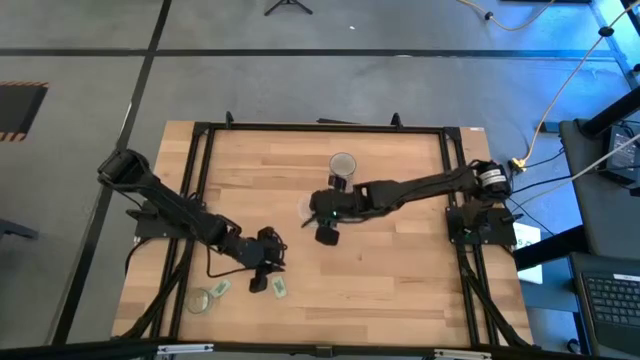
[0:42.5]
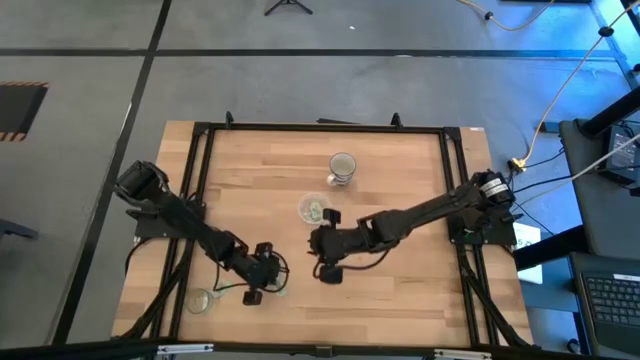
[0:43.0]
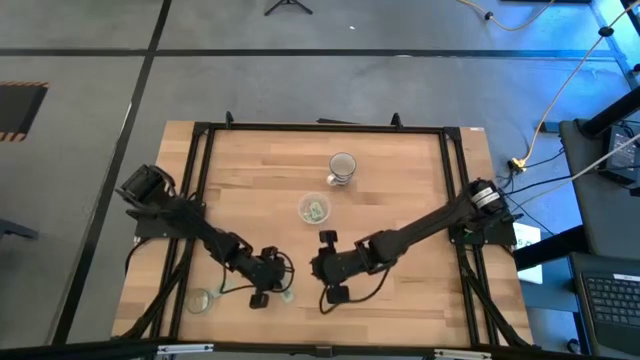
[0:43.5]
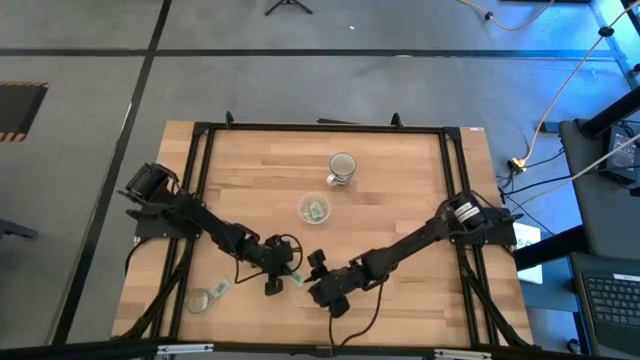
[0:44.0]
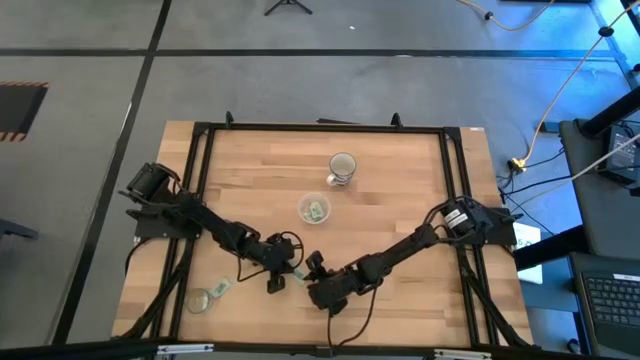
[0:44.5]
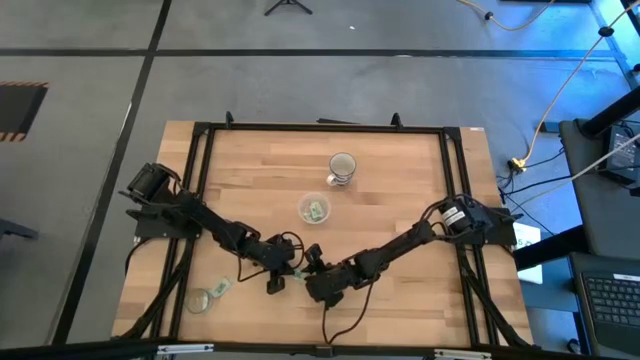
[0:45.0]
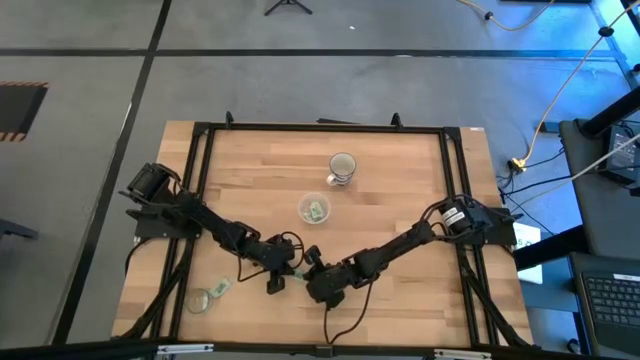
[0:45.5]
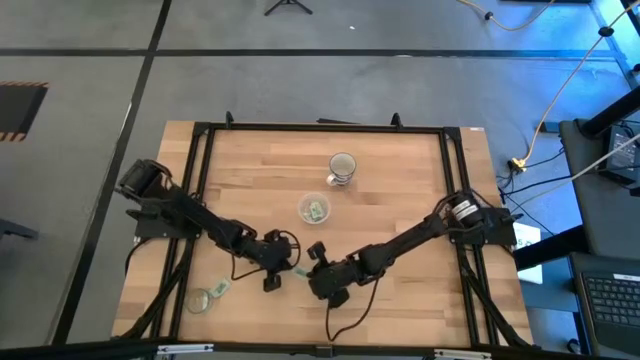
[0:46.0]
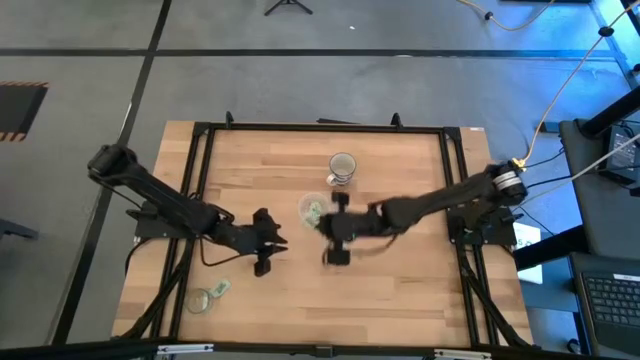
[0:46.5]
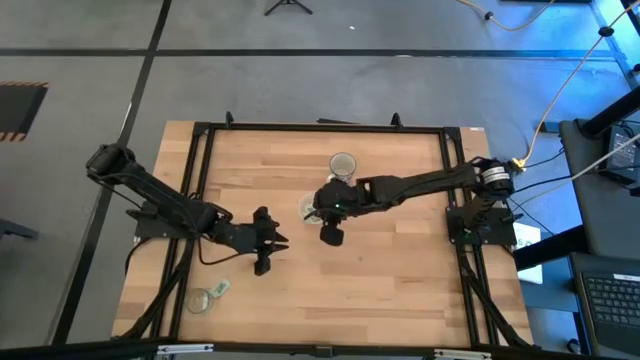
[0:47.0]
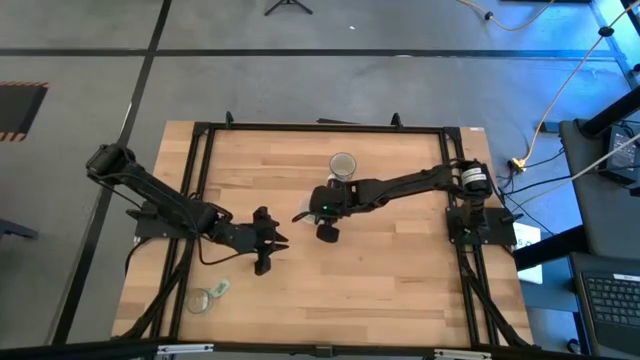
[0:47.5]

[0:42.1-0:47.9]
Task: Pick and place Stevia / Truvia into bins
Put the stevia packet into the transparent container

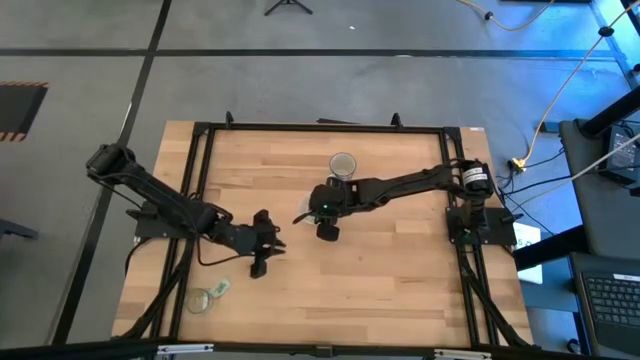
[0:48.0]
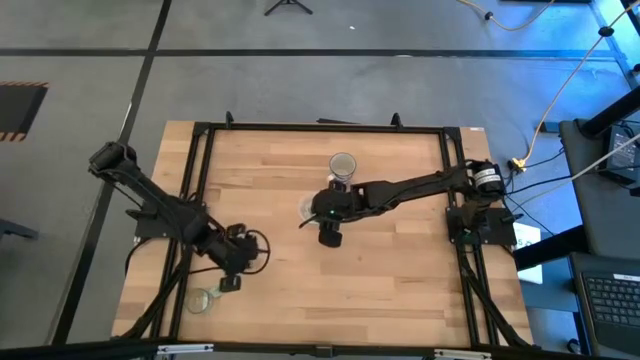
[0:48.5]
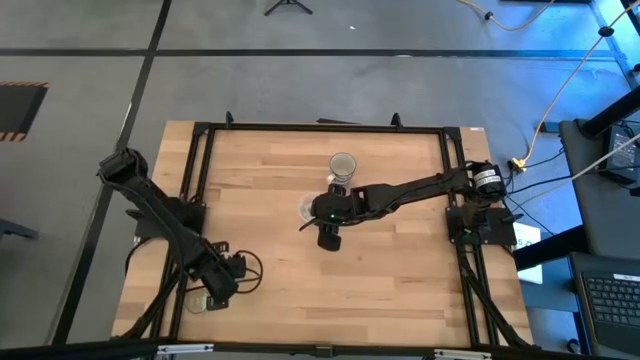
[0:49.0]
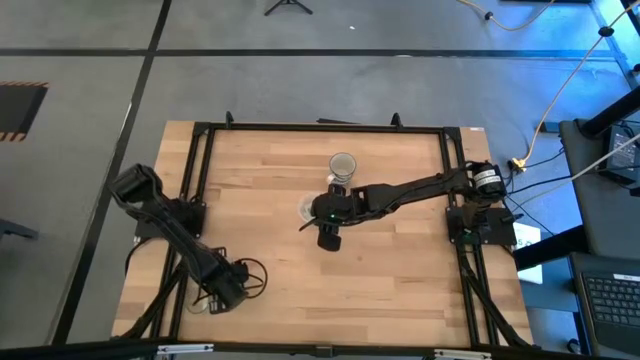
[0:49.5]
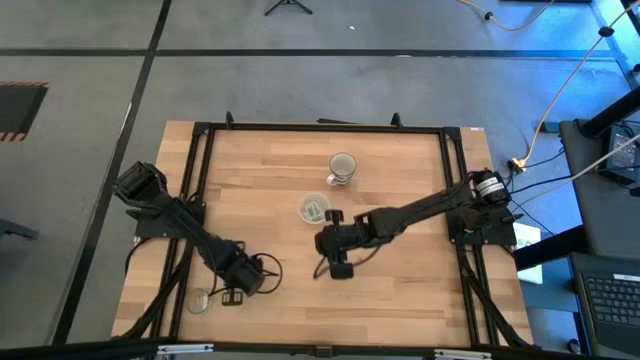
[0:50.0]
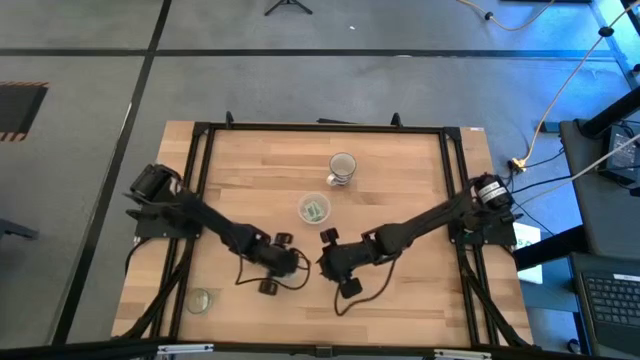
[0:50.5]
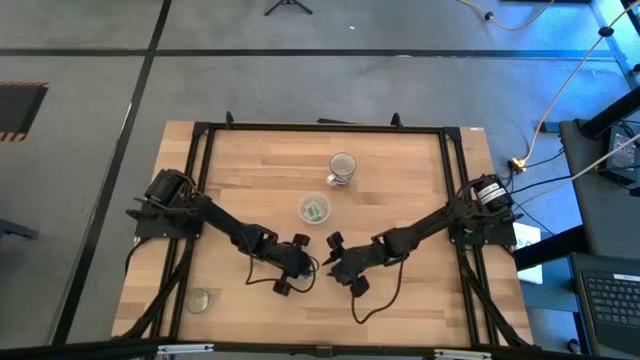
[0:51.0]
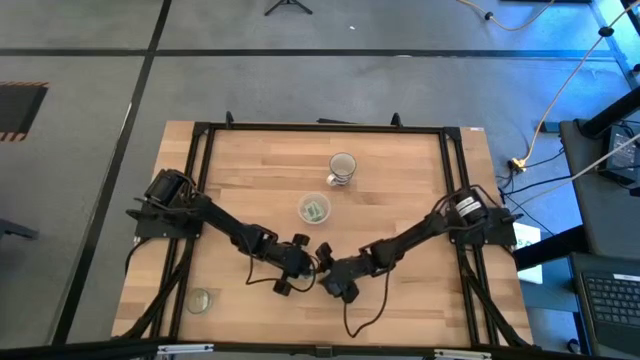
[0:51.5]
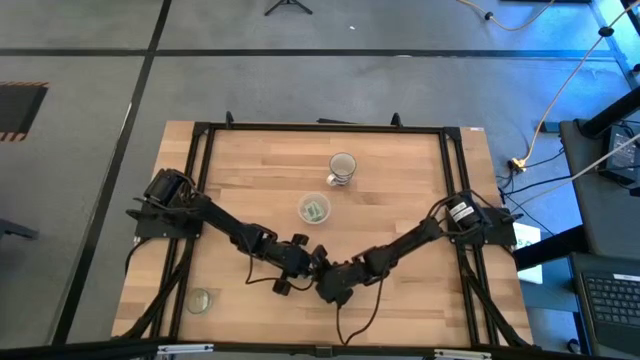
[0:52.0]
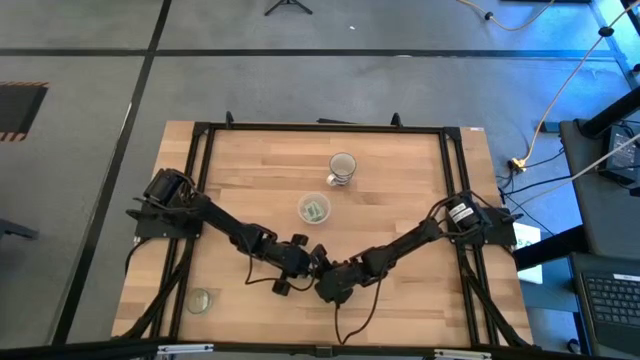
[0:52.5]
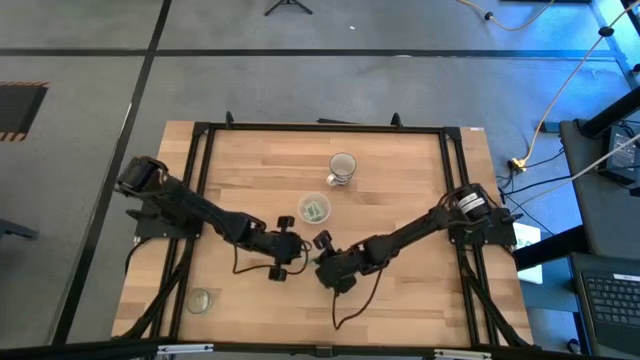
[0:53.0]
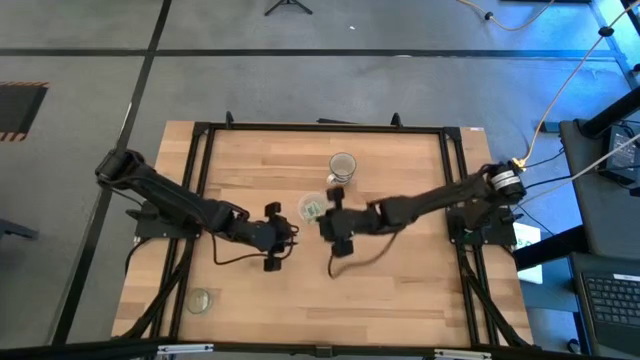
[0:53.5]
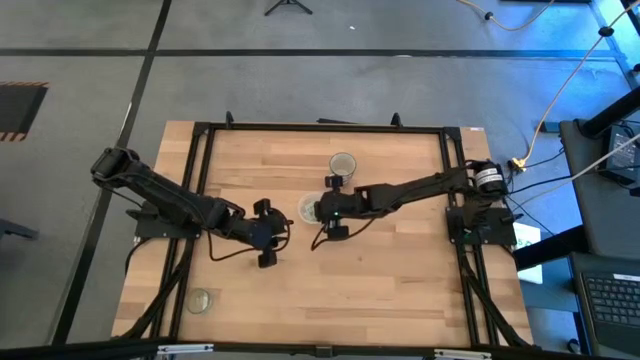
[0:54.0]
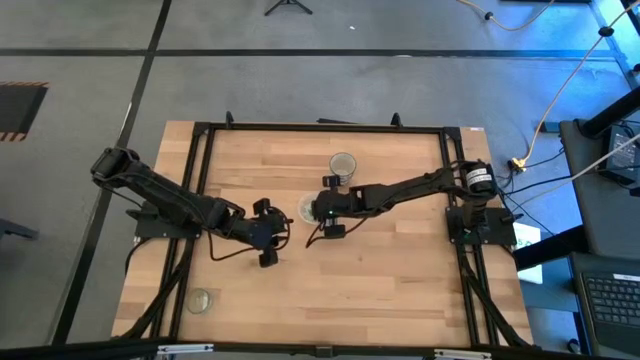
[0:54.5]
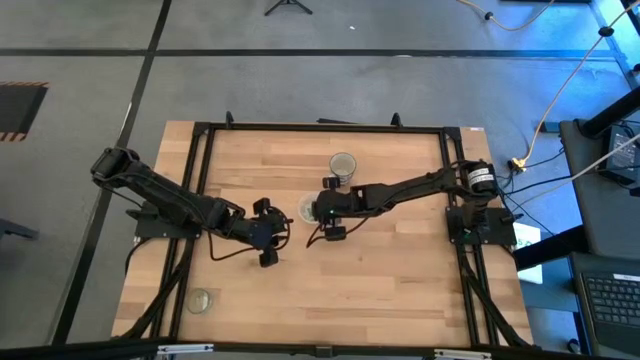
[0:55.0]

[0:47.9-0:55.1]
Put the stevia packet into the transparent container

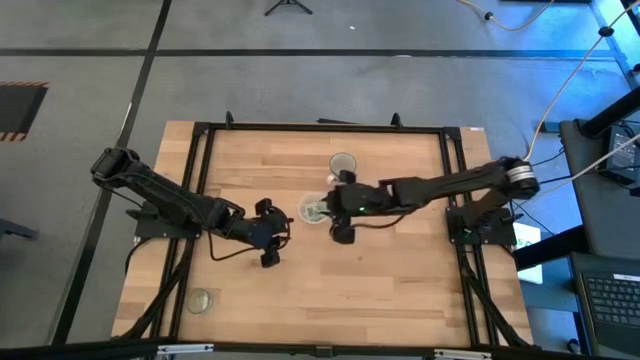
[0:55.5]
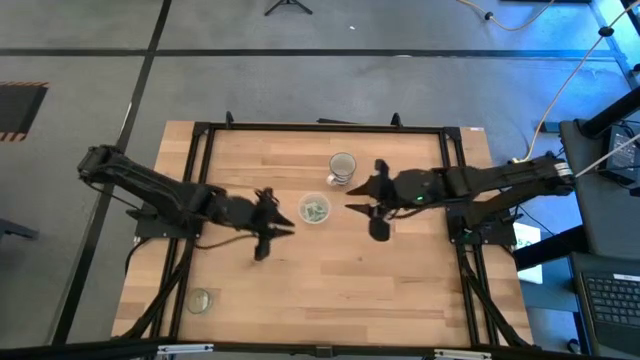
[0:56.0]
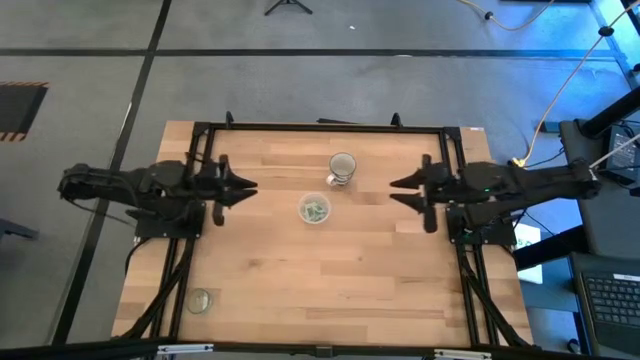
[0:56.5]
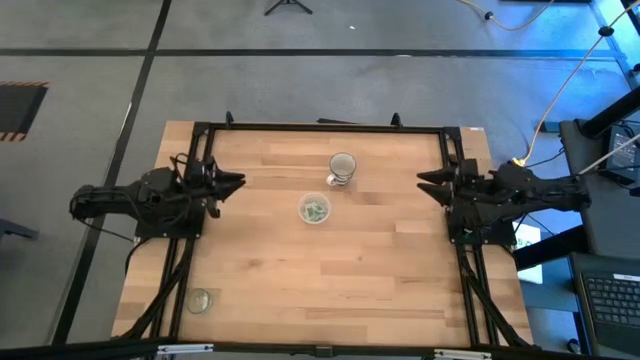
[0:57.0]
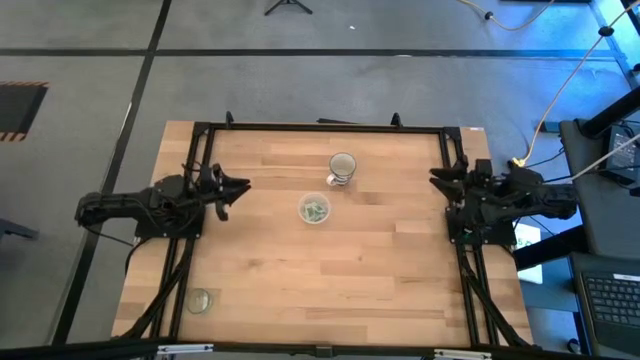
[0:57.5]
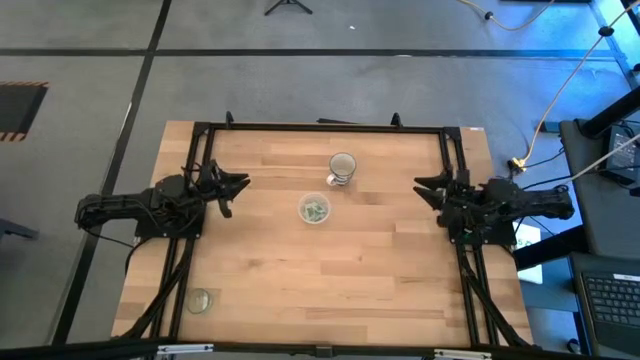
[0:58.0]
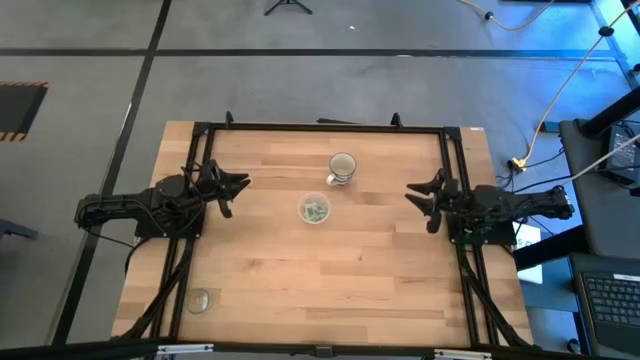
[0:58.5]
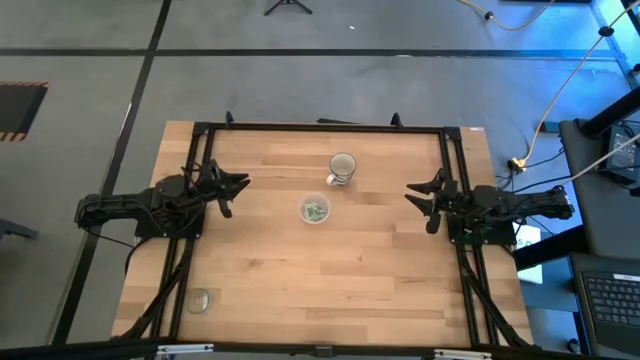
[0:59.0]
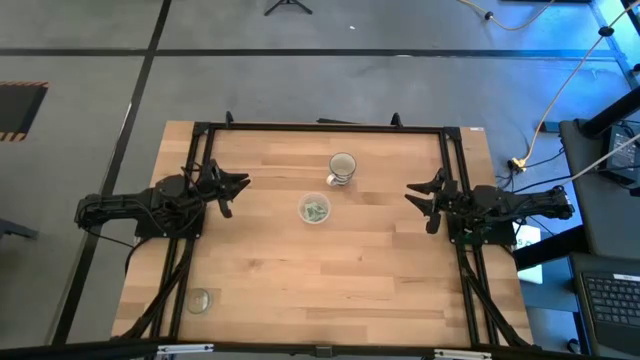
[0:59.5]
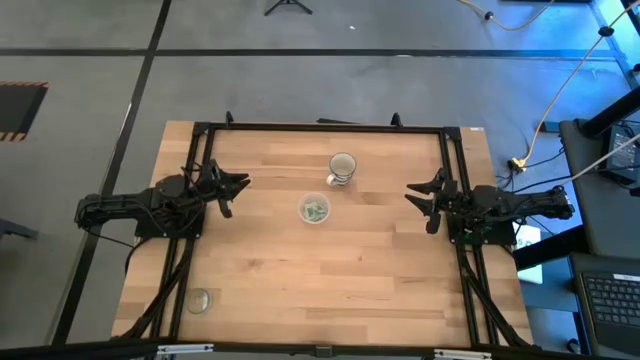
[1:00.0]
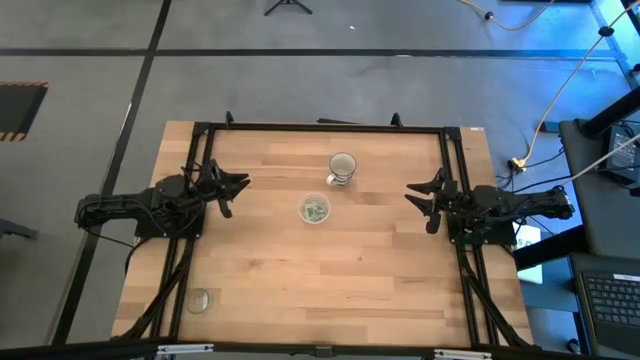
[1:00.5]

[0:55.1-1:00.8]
Return to Home Position

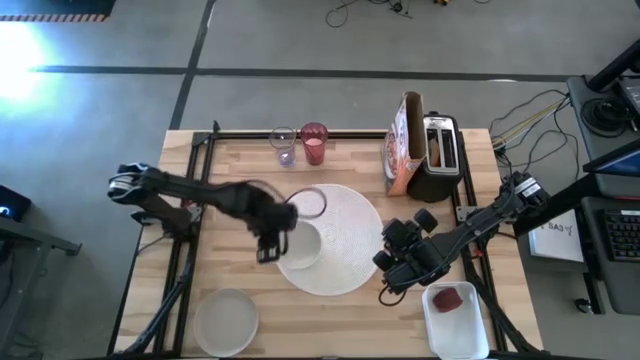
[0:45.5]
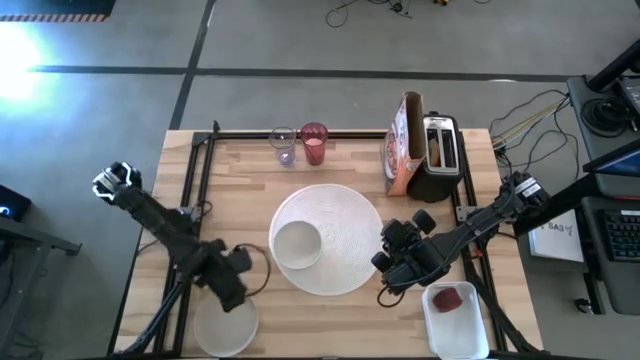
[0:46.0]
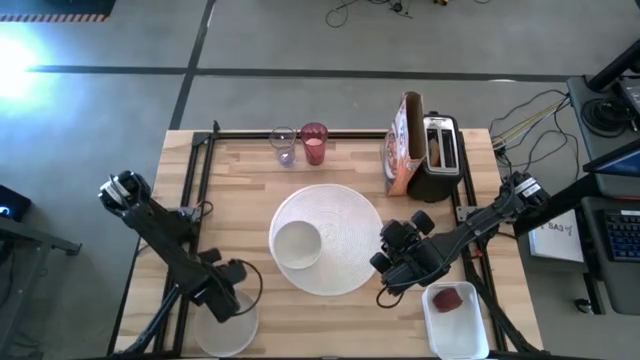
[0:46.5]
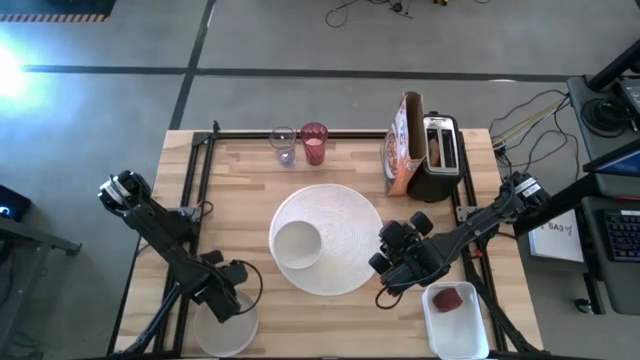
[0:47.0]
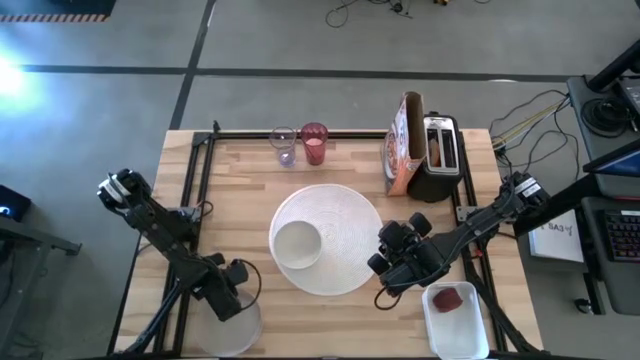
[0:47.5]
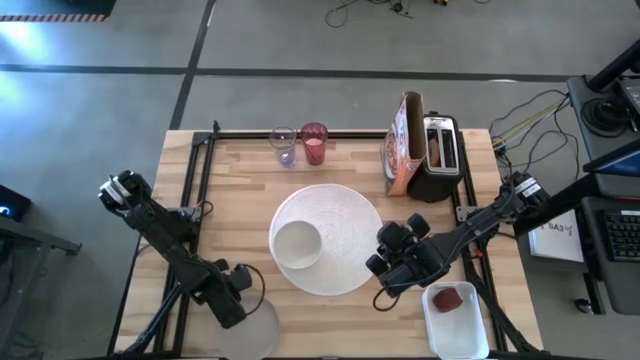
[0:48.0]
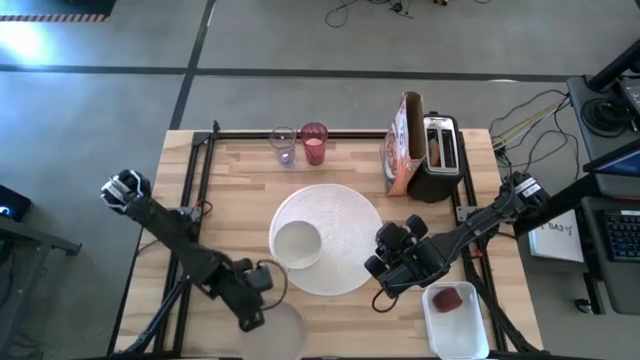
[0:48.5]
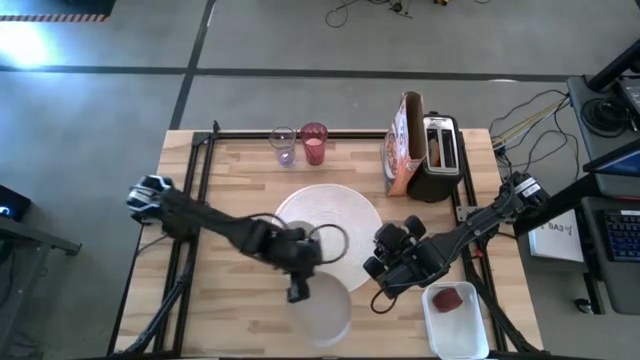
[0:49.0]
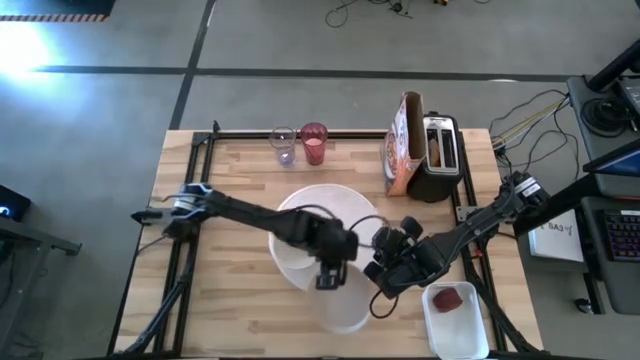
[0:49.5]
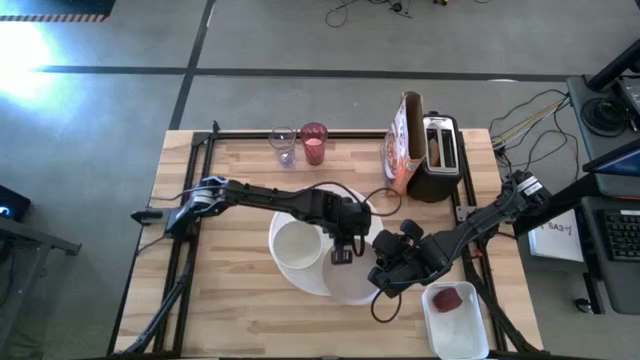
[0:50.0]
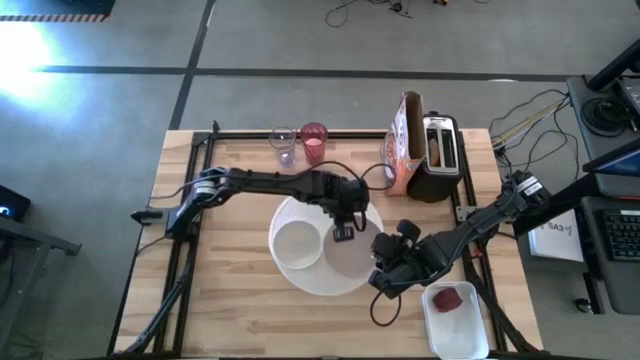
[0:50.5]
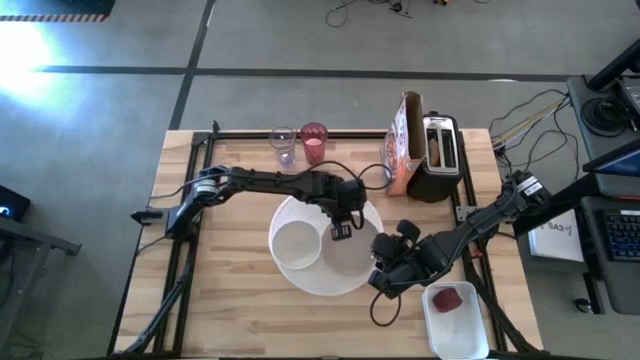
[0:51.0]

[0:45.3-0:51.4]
Task: Arrange a breakfast setting
Put the gray plate to the right of the white bowl on the white table mat
